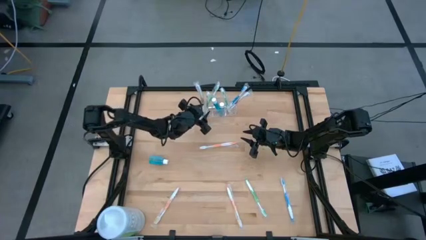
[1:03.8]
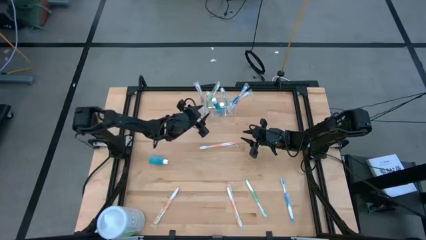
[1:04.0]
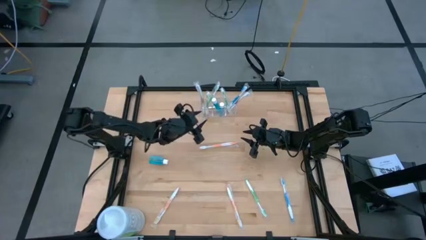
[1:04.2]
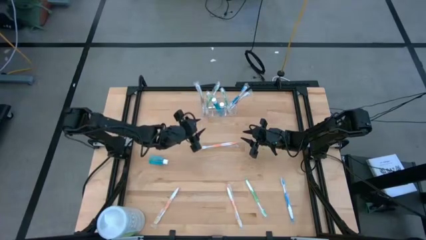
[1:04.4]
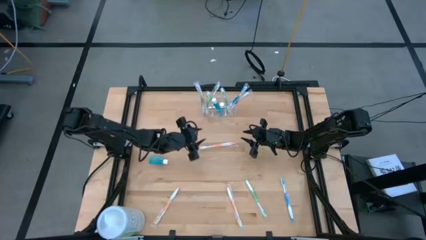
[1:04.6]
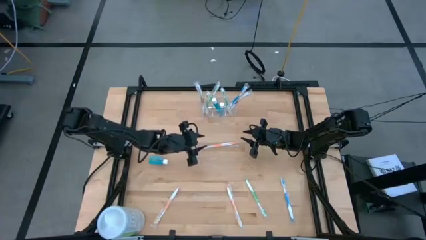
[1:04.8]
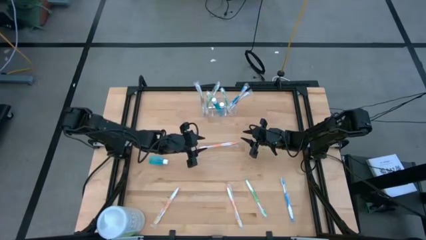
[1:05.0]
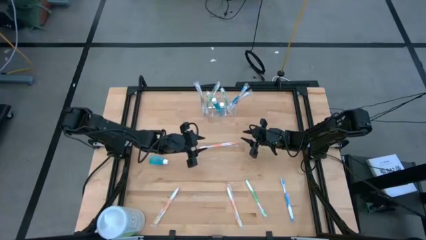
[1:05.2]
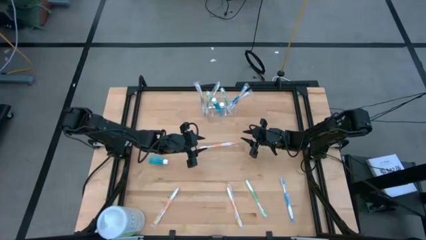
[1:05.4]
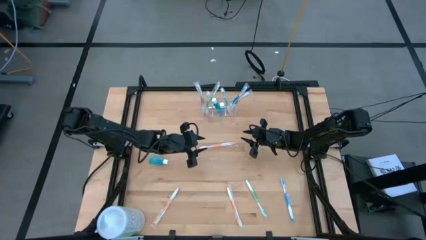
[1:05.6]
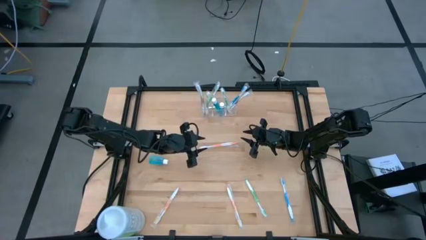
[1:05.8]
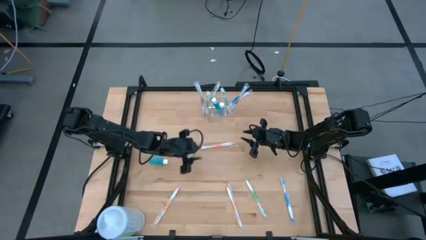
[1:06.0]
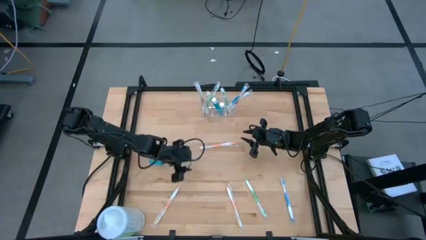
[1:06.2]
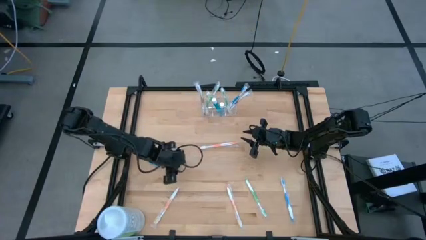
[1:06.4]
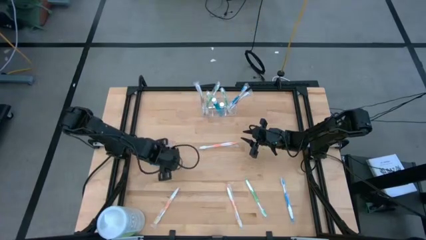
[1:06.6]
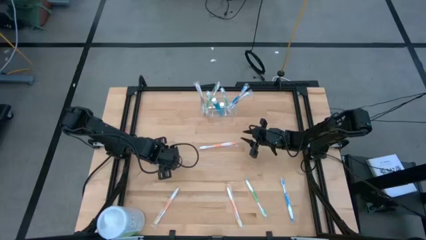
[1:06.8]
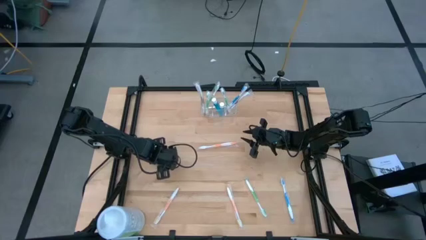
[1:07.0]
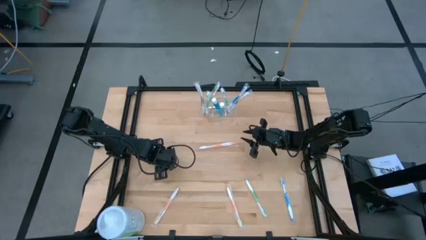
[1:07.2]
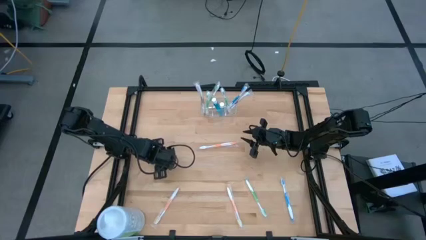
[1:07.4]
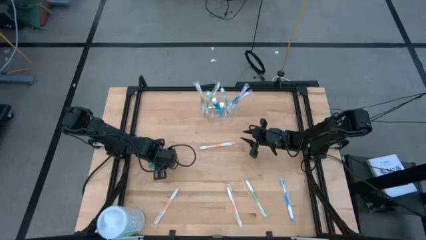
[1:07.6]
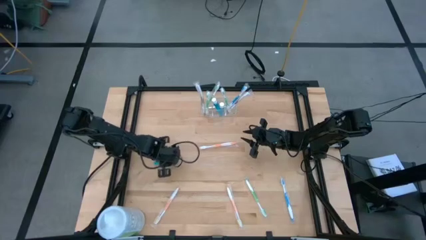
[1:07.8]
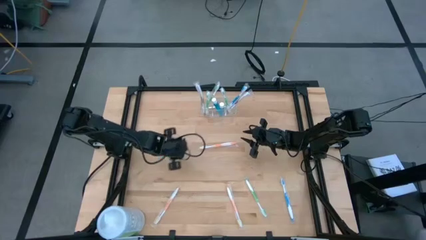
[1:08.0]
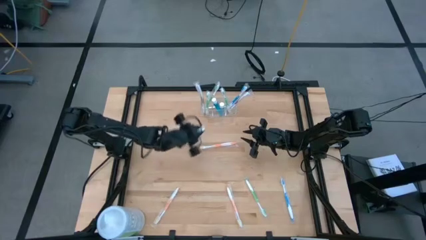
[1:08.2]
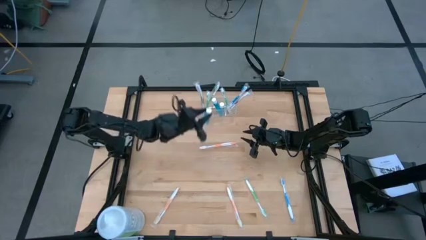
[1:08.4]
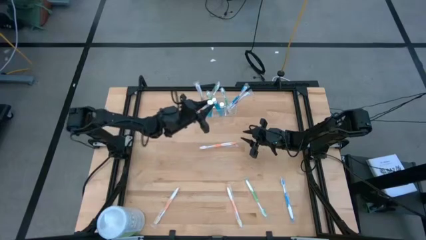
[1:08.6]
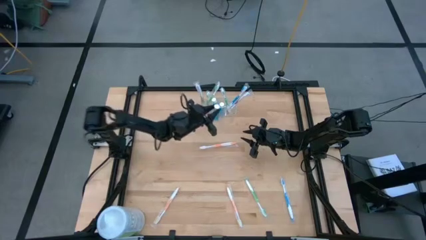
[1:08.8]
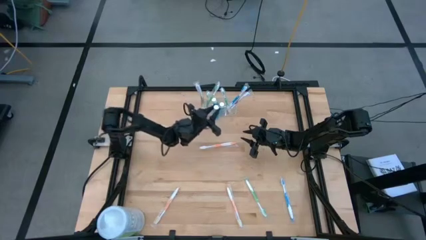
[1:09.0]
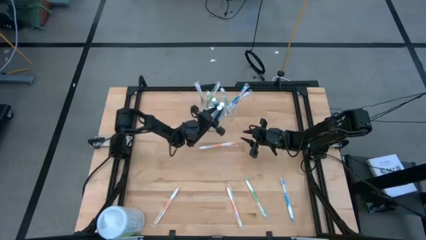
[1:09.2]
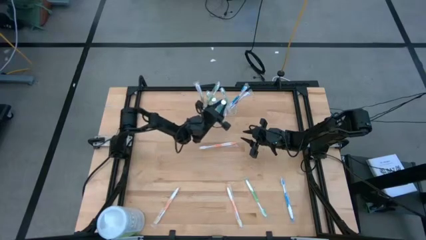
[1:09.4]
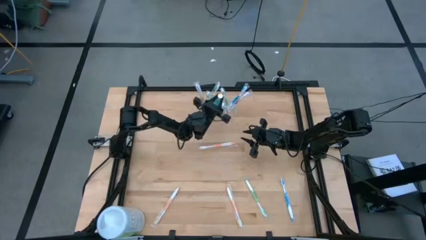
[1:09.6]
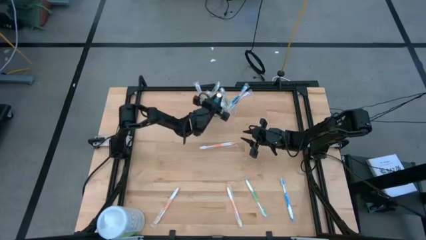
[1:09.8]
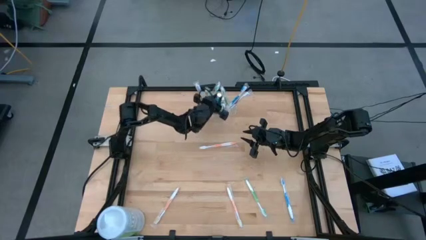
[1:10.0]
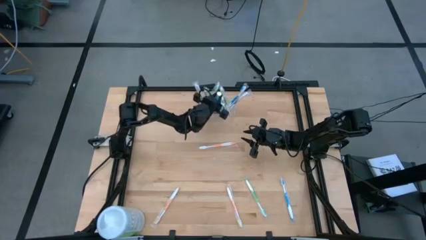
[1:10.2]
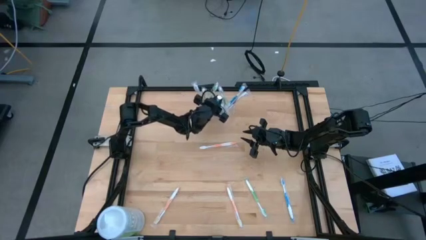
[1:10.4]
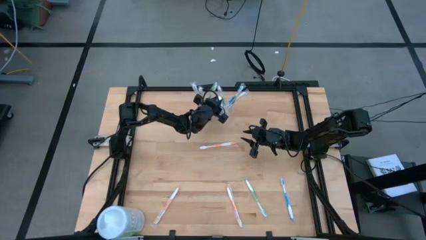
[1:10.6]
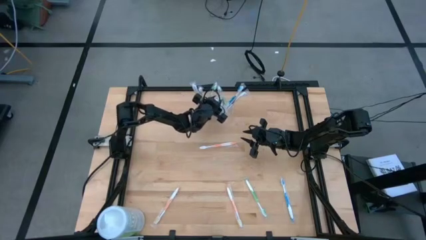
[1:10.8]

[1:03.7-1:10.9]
Task: Pick & Place toothbrushing station
Put the blue mouthwash bottle into the transparent organizer

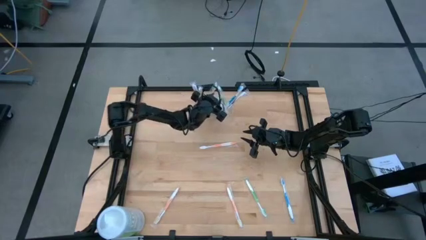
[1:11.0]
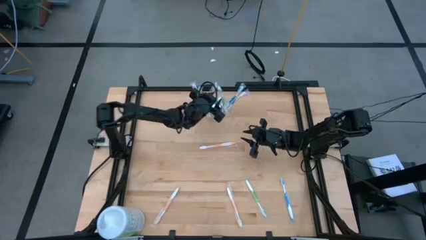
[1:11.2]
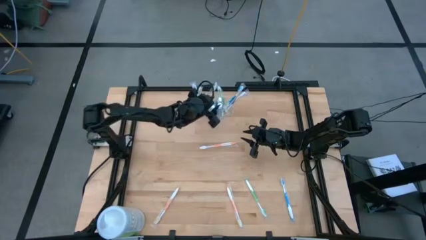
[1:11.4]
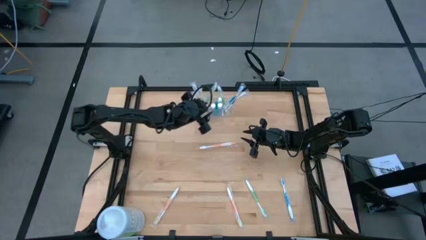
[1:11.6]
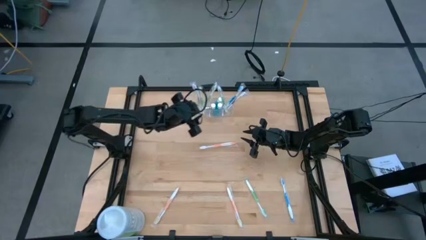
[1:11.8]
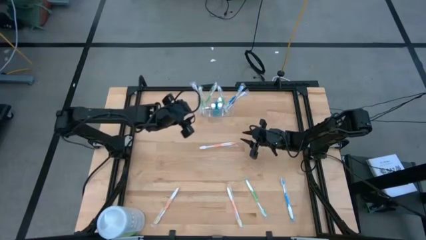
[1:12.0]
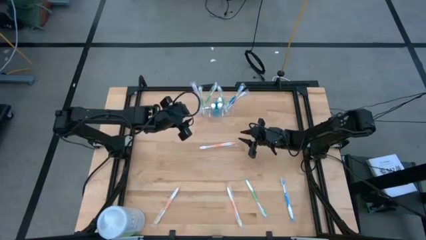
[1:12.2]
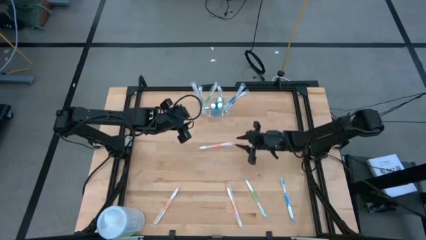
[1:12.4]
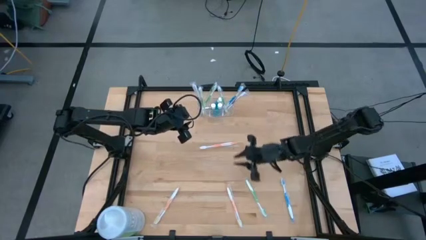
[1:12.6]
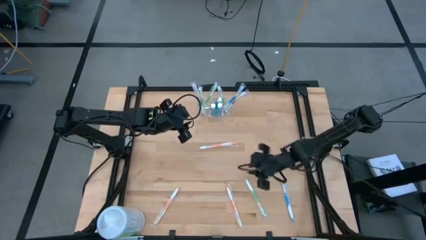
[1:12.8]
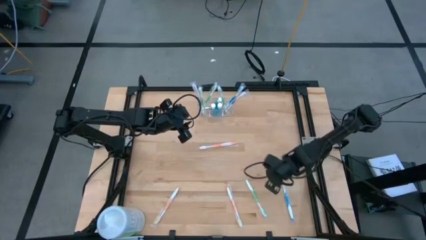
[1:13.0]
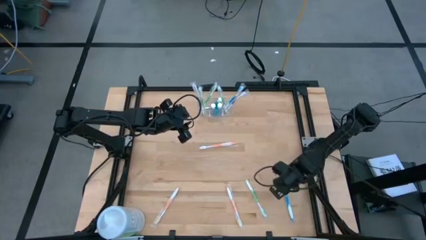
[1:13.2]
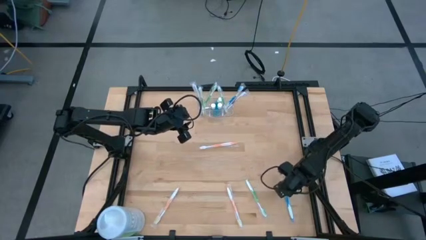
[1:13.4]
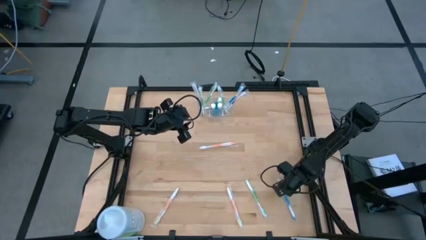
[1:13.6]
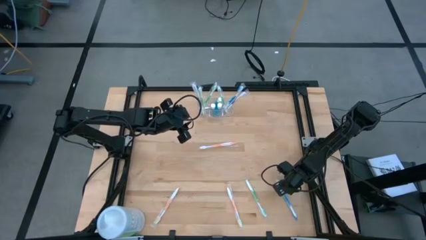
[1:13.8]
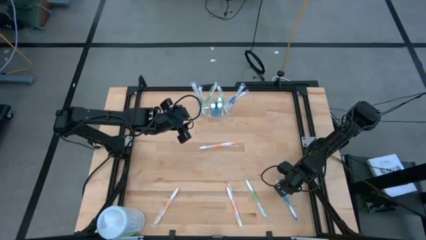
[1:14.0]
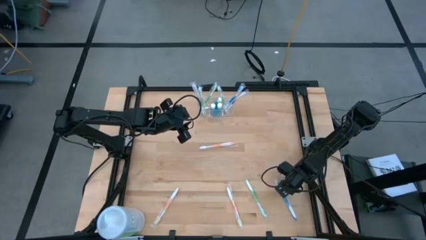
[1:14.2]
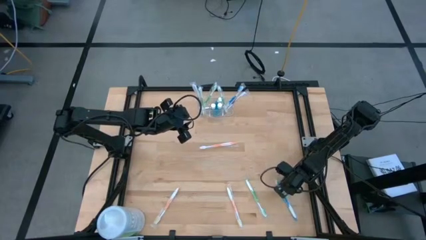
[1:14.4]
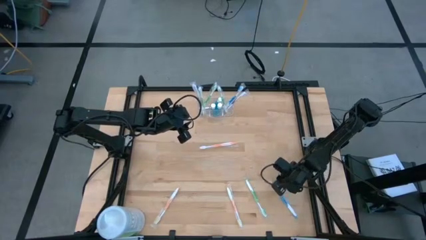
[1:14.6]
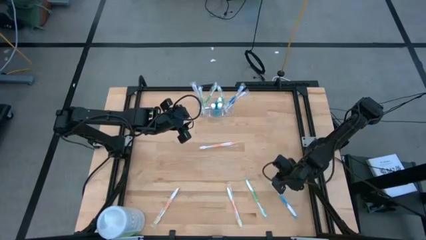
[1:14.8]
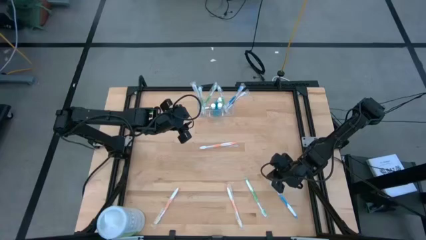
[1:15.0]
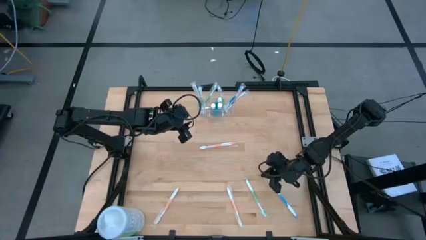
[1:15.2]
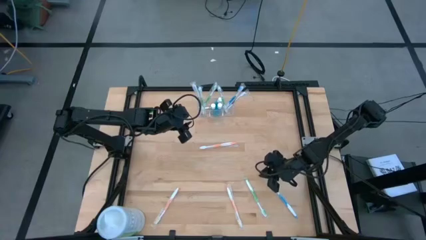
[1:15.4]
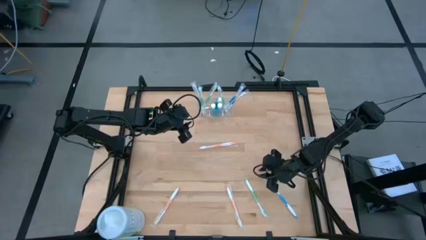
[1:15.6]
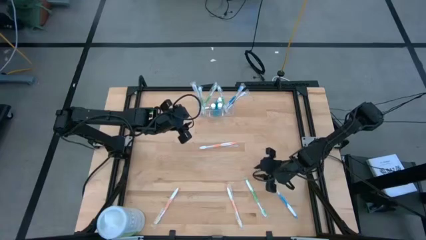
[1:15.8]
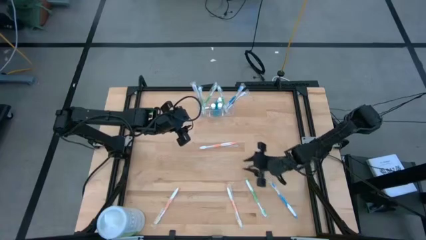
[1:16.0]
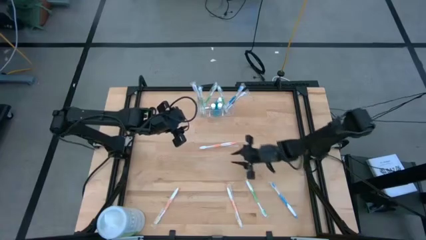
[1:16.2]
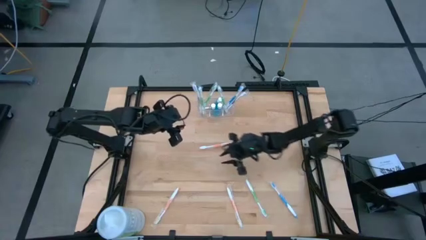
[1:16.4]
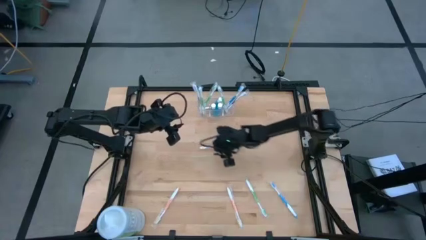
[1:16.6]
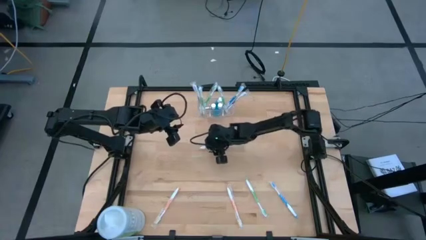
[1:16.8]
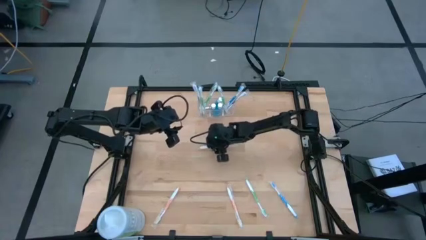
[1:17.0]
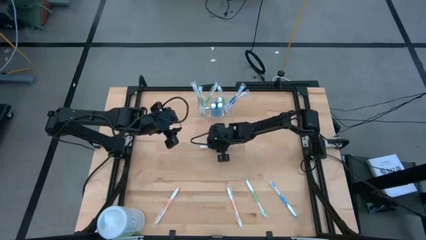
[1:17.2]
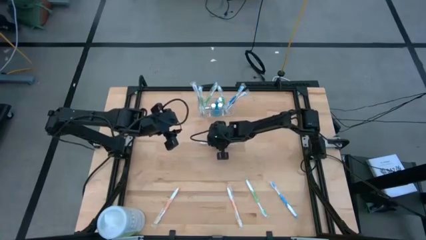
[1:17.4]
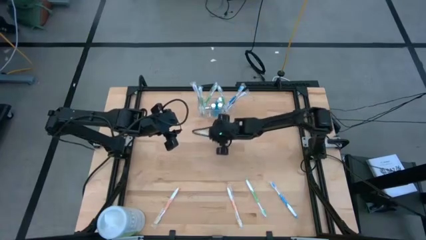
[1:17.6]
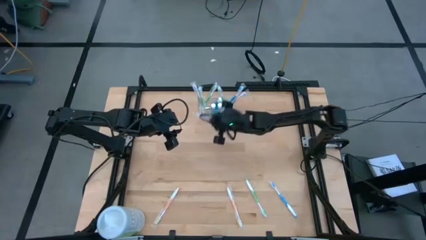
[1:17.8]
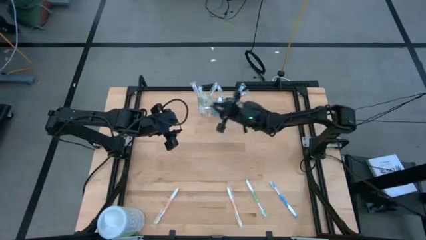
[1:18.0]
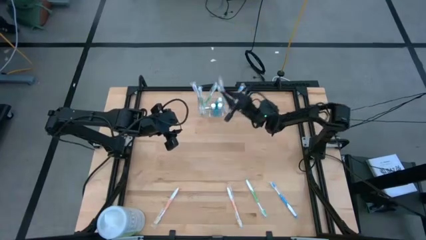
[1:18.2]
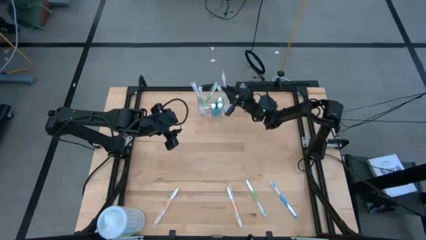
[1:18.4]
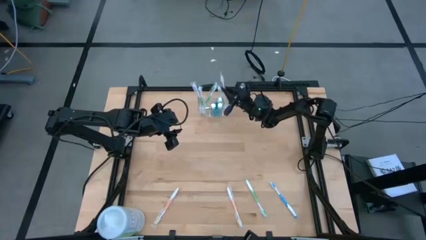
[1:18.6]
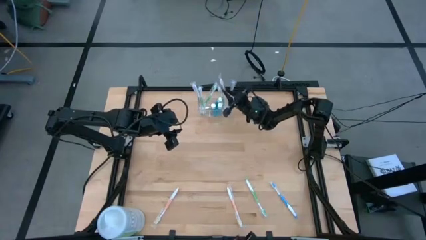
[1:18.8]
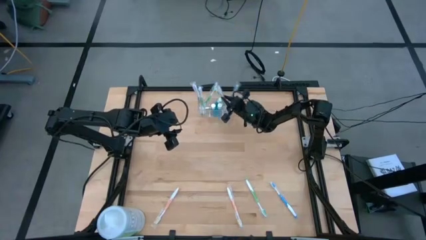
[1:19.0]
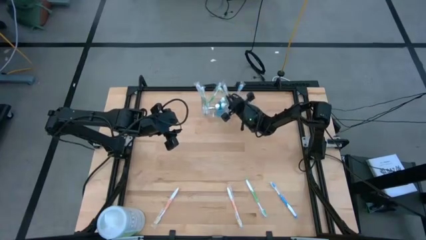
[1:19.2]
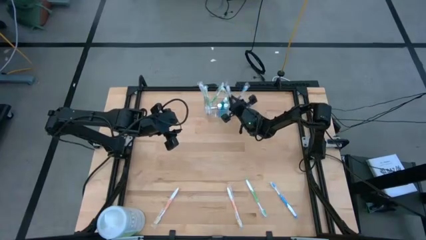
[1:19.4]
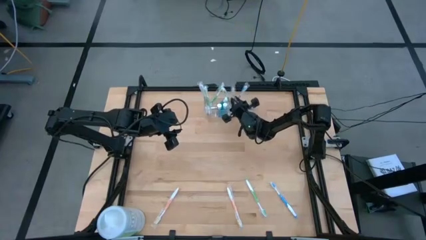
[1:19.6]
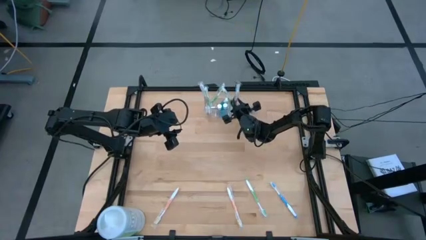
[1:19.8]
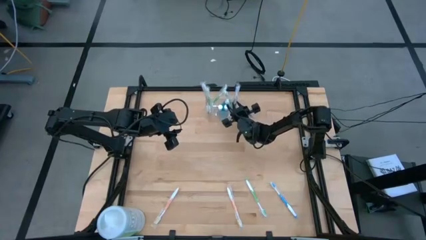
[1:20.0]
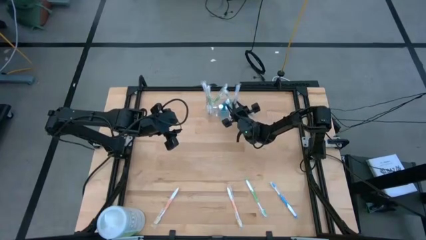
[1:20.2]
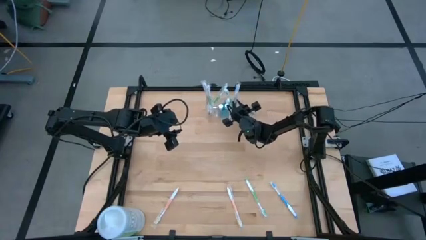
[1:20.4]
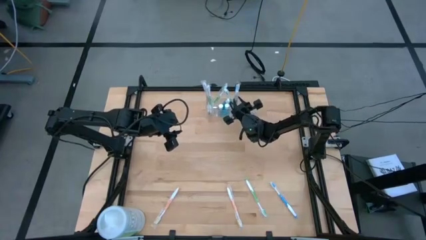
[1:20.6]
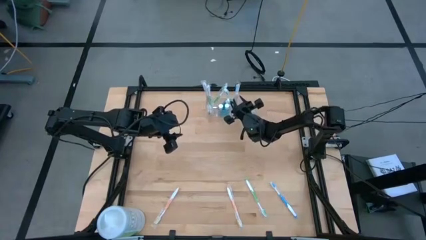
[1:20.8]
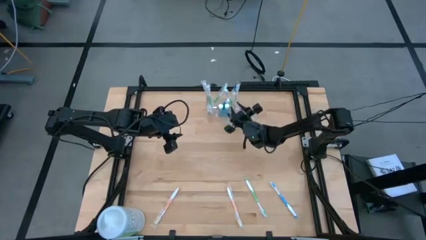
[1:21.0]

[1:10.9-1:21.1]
Put the orange toothbrush into the transparent organizer
